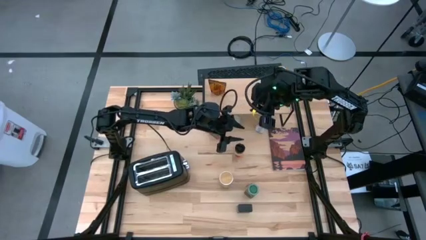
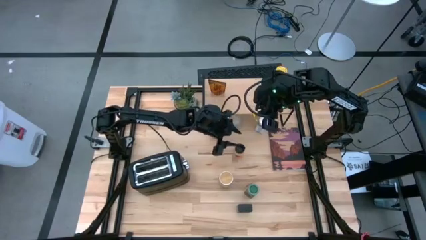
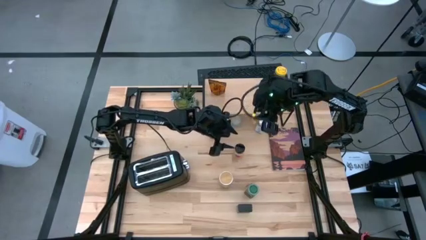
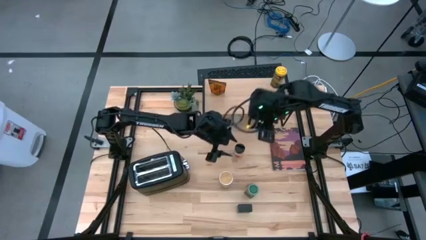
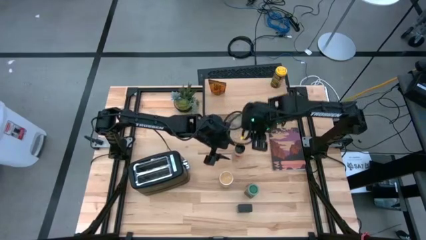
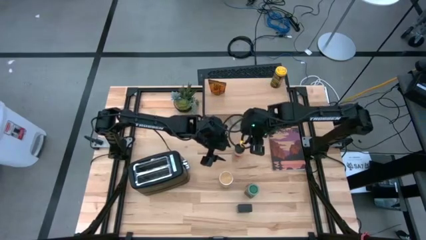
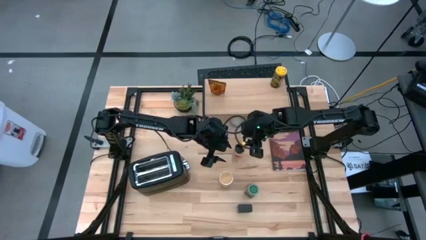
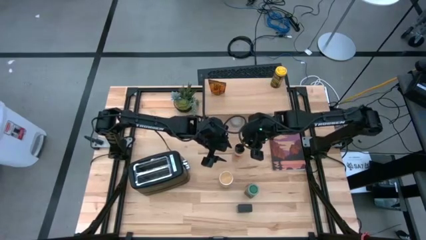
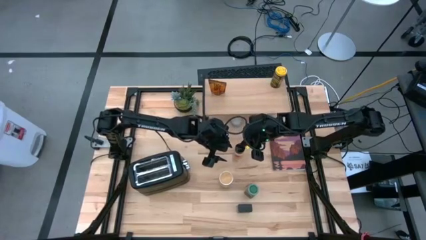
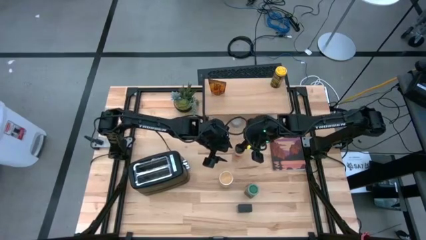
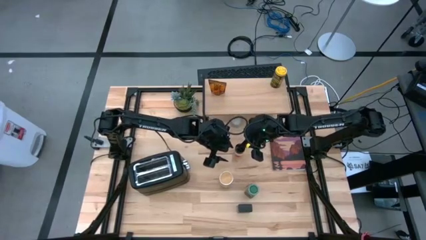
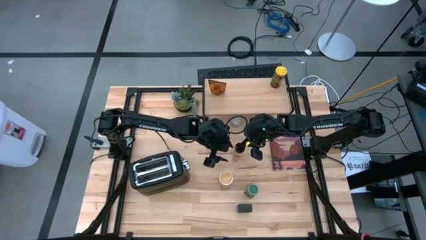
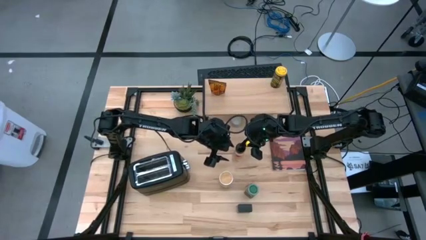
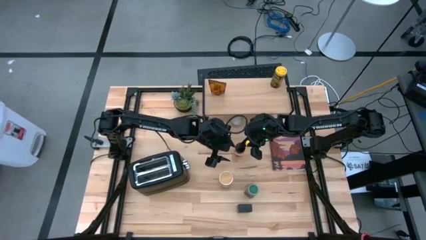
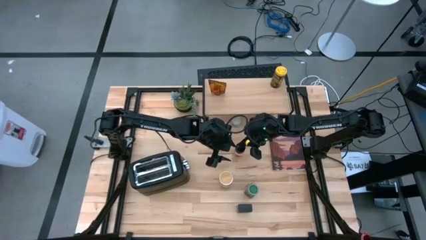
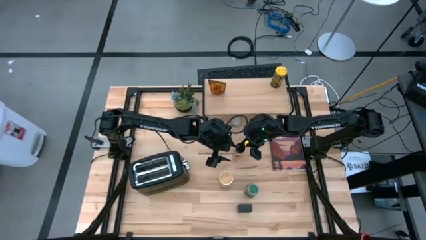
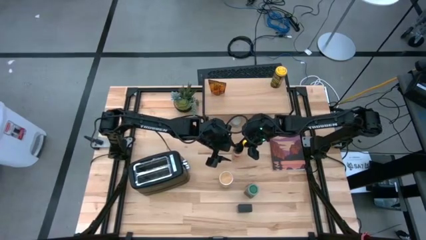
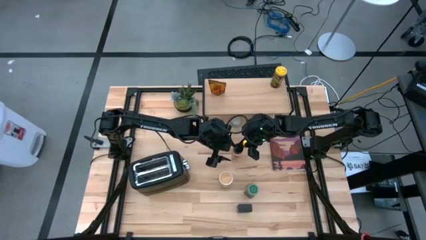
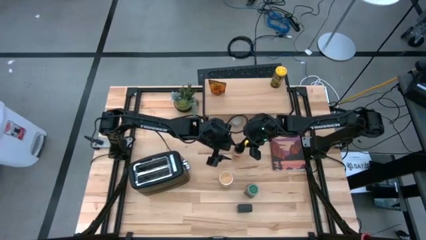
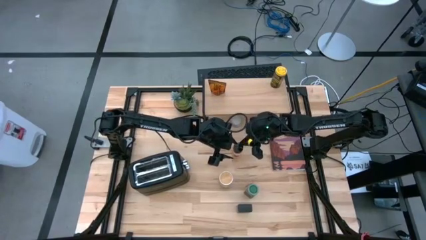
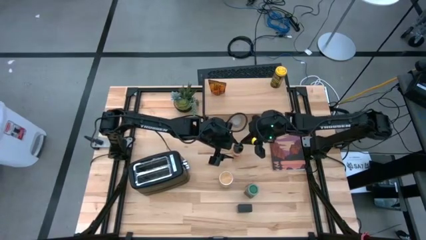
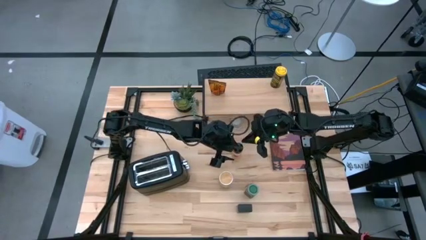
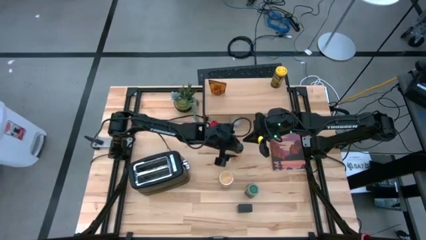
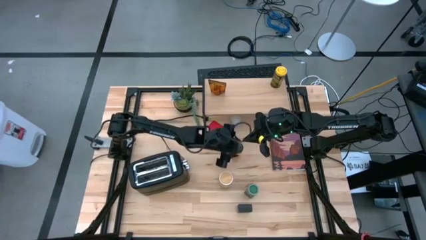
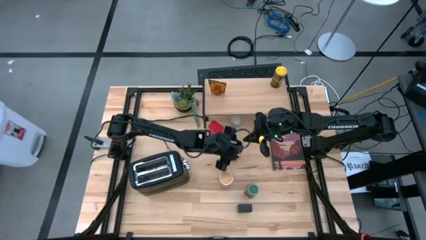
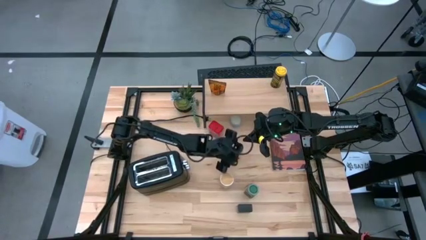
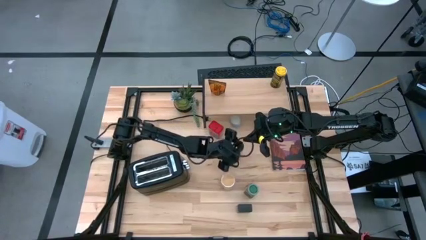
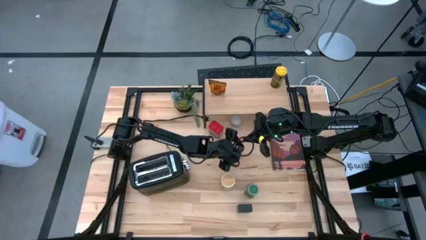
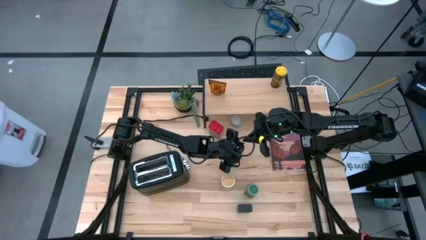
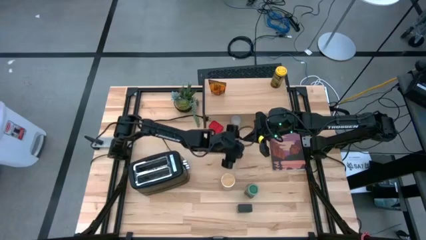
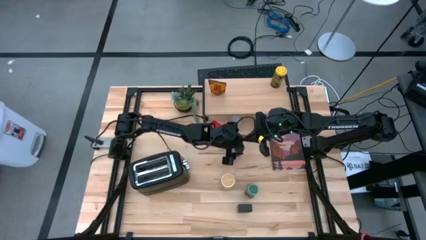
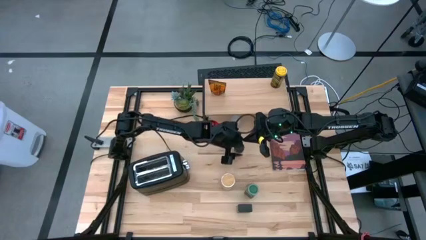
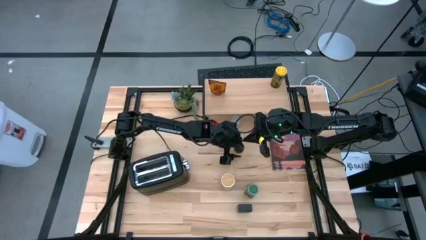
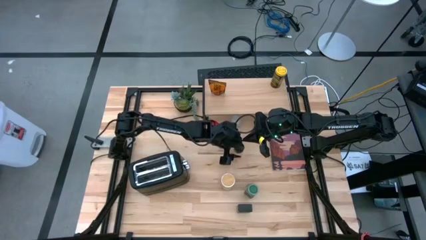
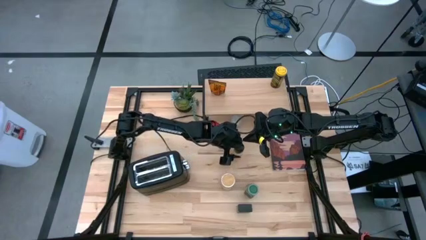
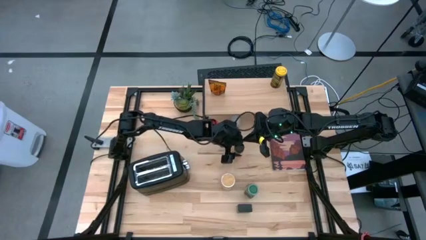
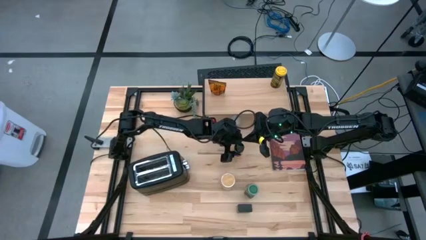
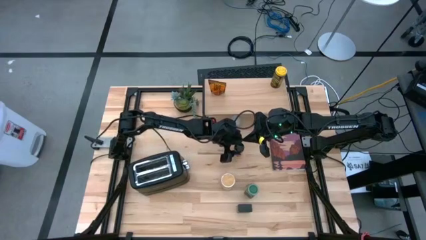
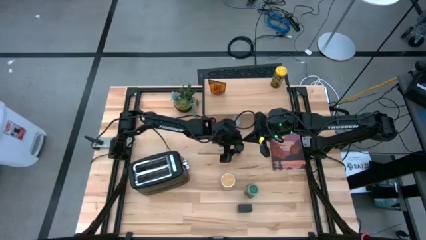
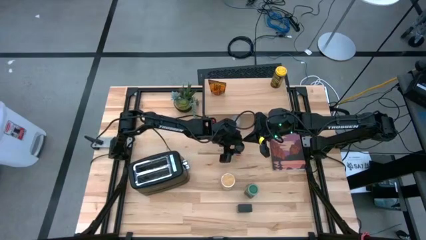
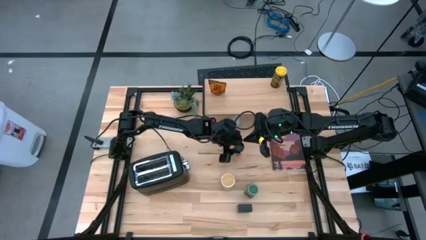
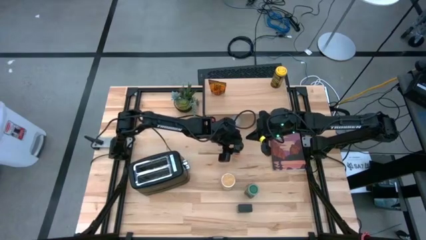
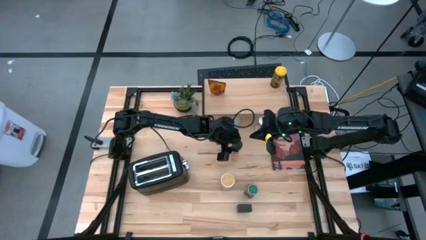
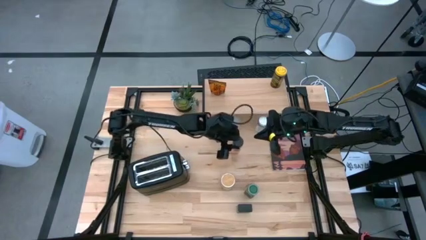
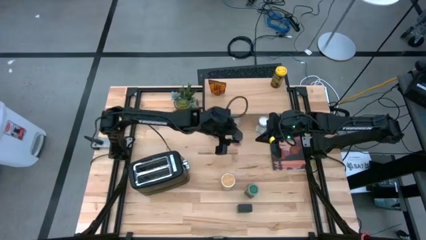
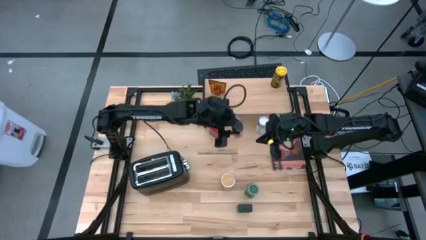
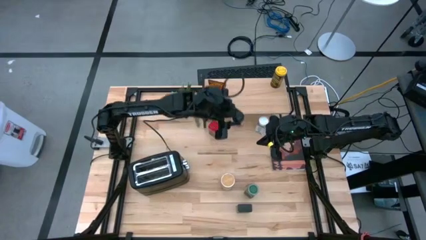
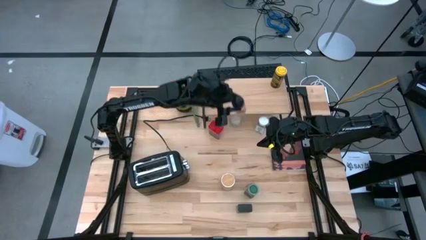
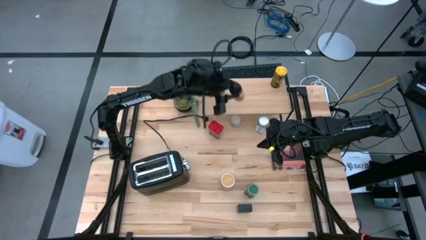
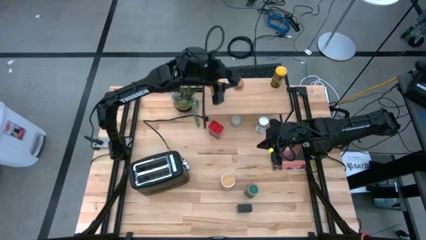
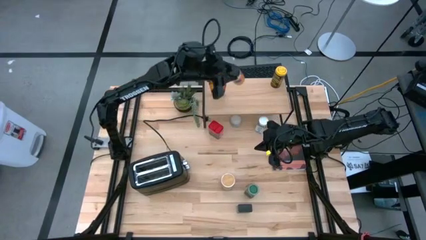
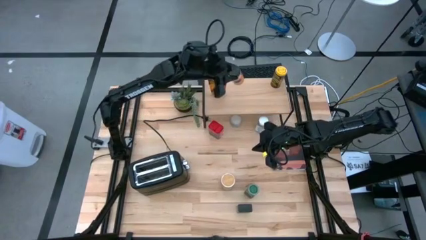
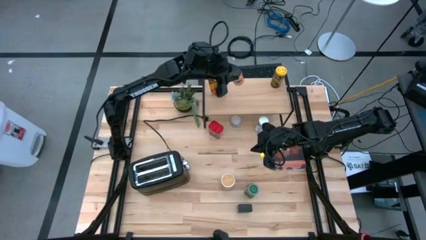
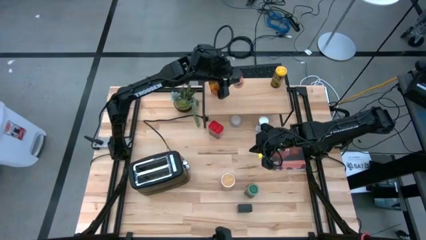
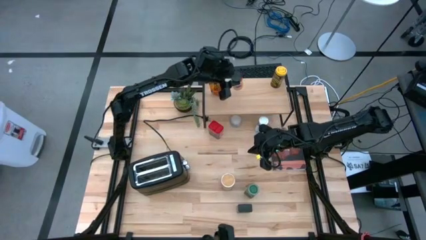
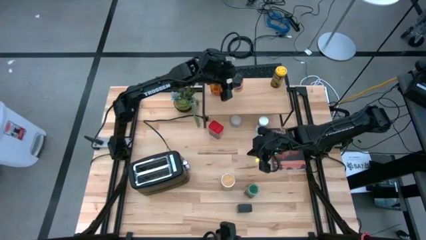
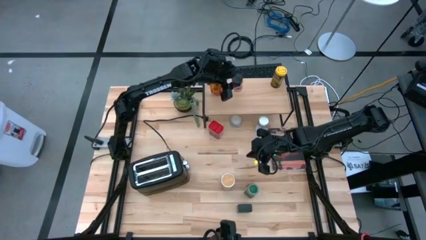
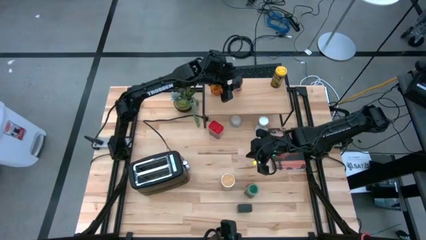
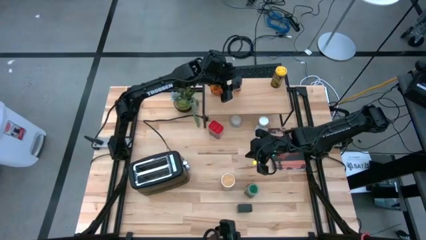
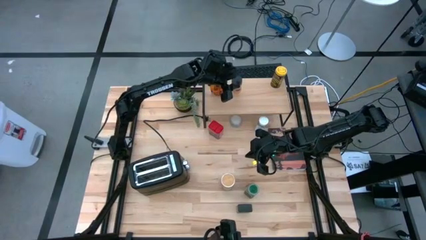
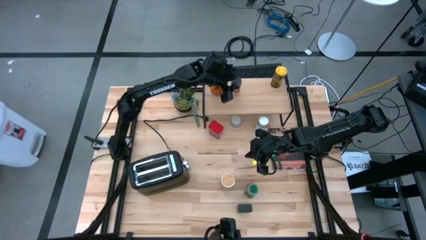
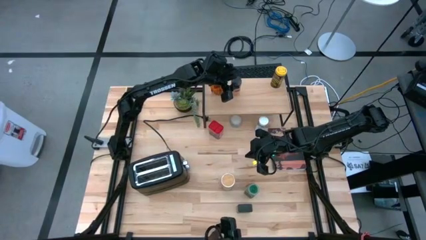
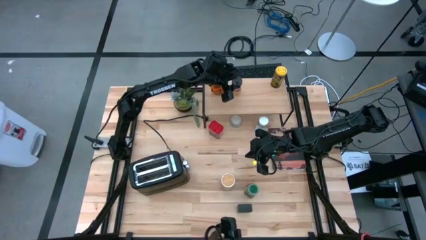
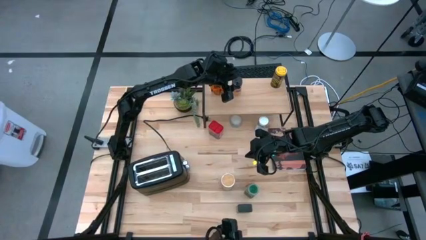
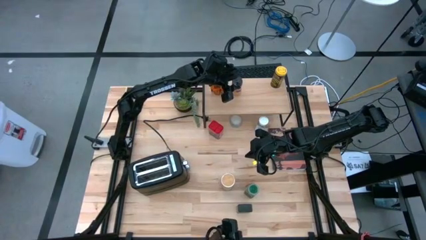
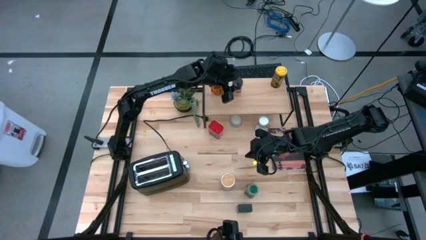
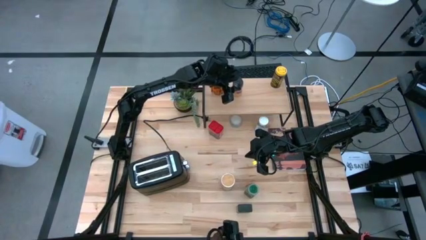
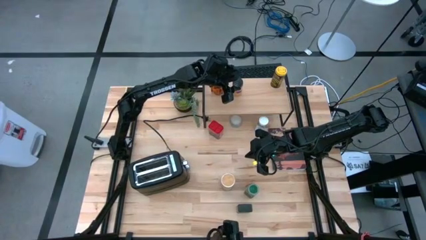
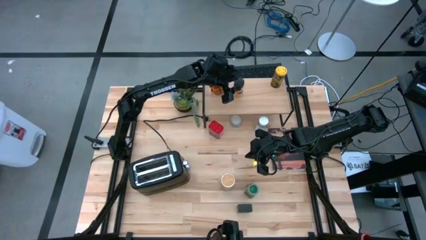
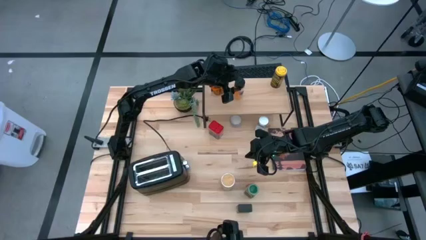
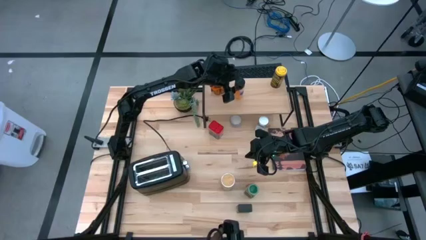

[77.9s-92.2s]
Task: Shelf spices
Put the black seasoning bottle on the shelf

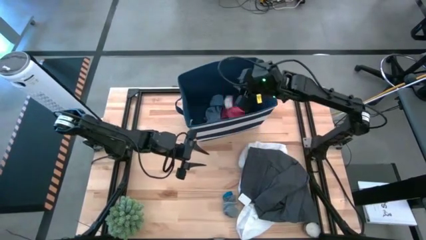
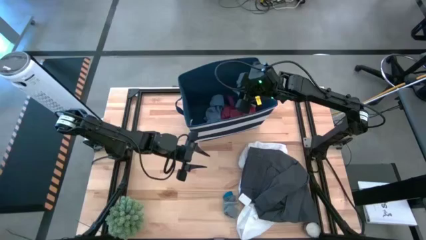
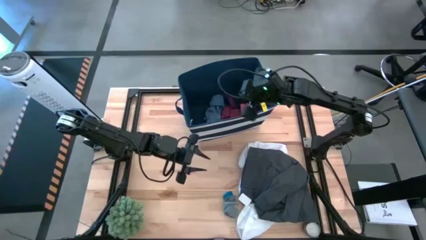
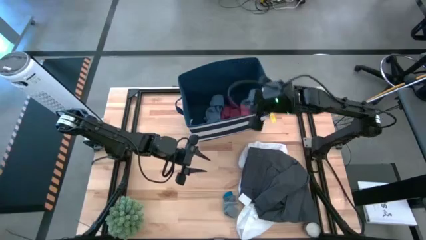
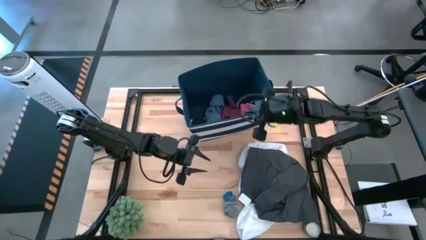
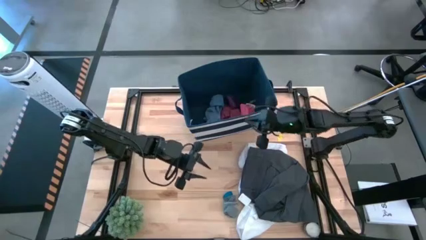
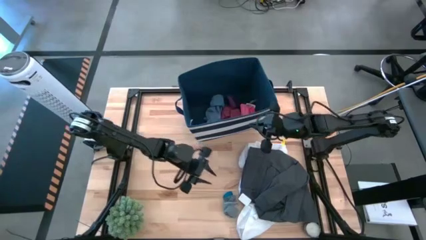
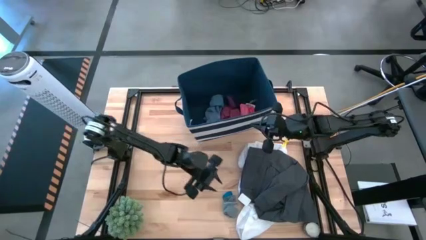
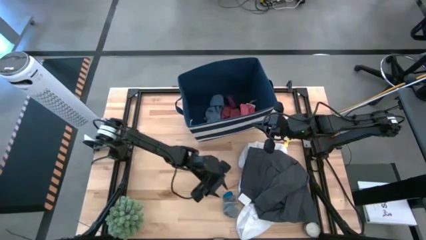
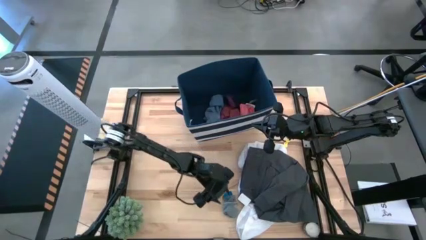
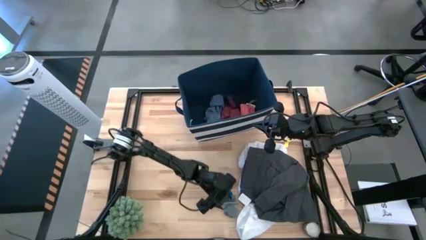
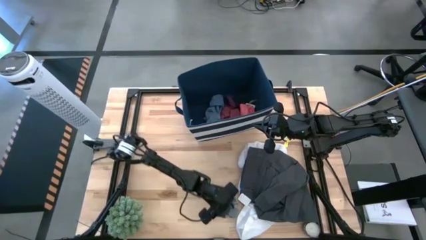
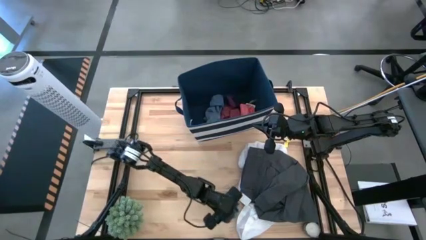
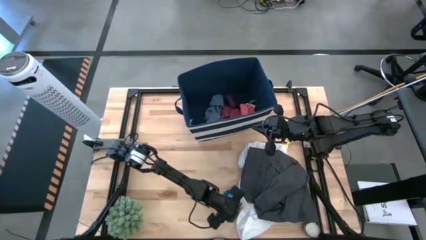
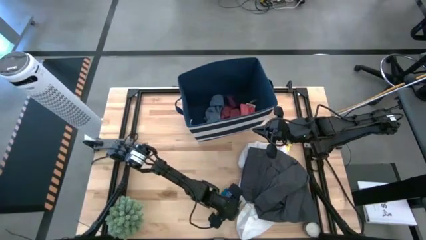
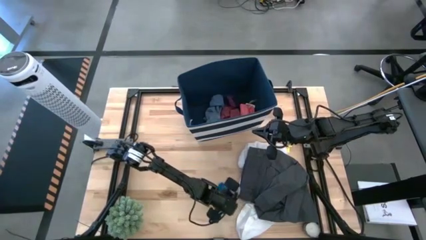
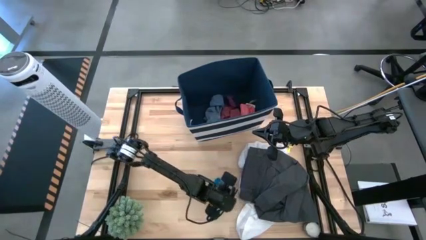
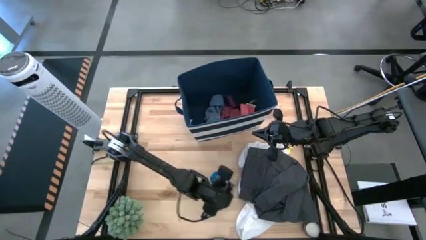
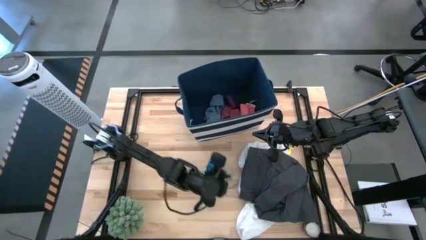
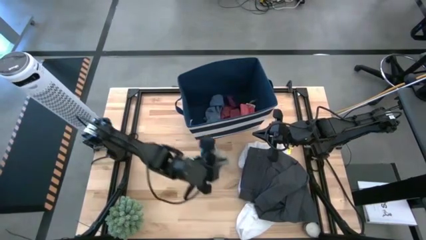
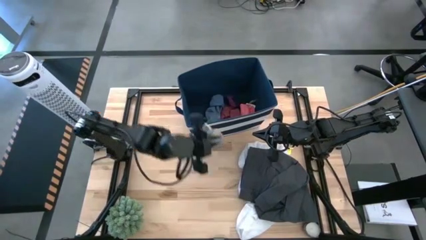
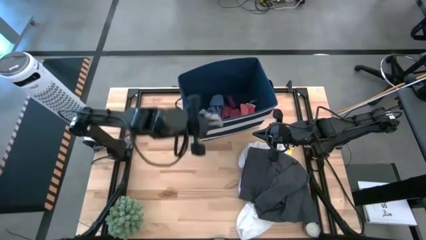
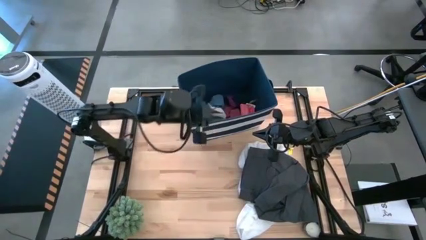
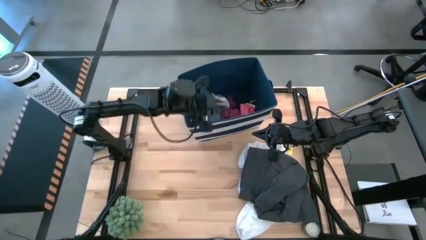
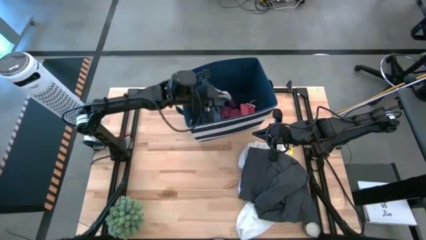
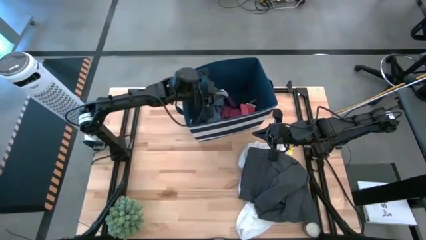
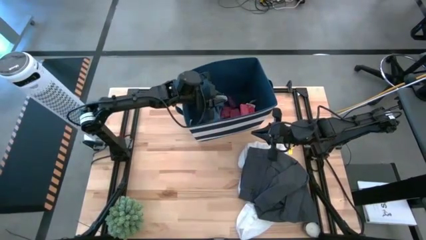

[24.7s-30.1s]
Task: Sort clothes
Put the gray-blue socks into the laundry bin
